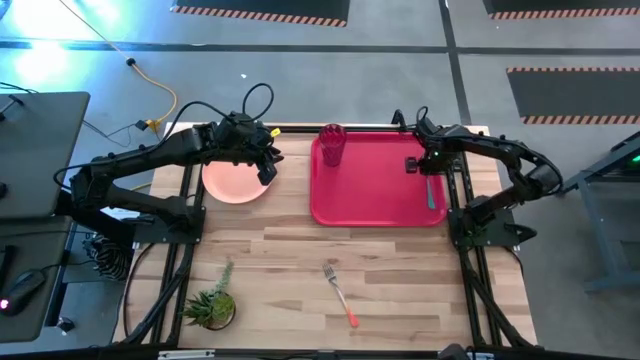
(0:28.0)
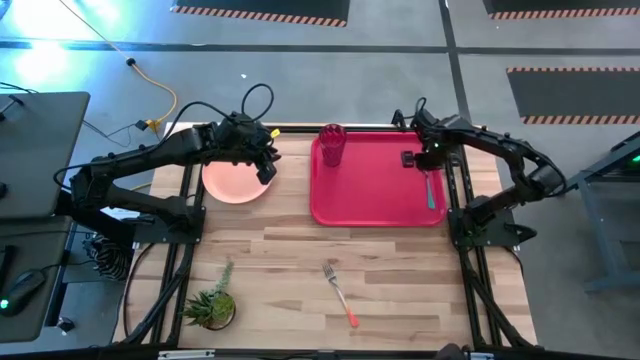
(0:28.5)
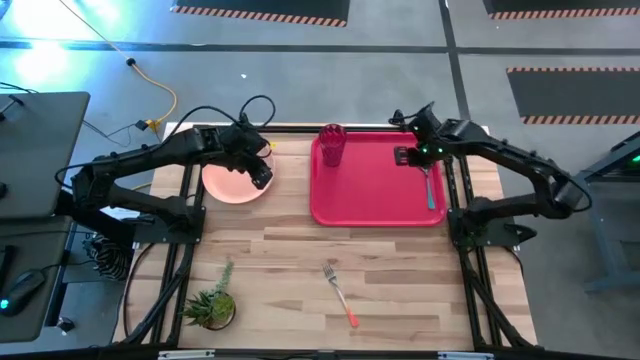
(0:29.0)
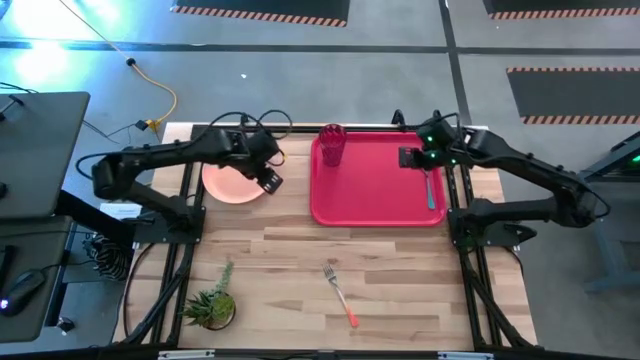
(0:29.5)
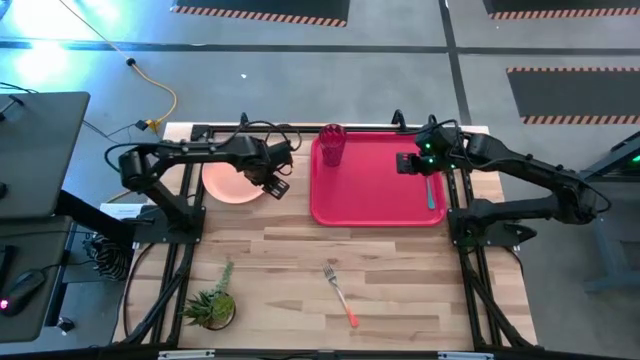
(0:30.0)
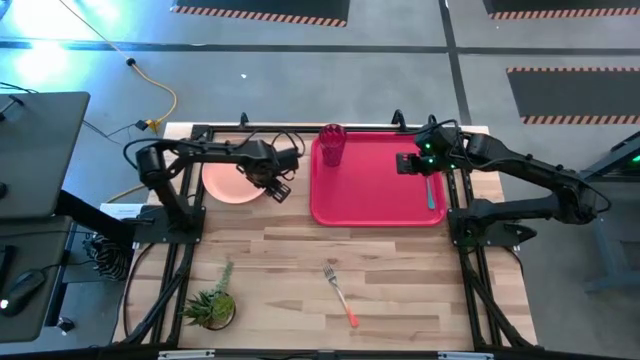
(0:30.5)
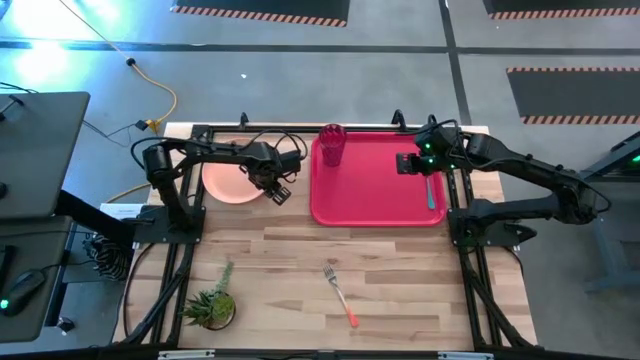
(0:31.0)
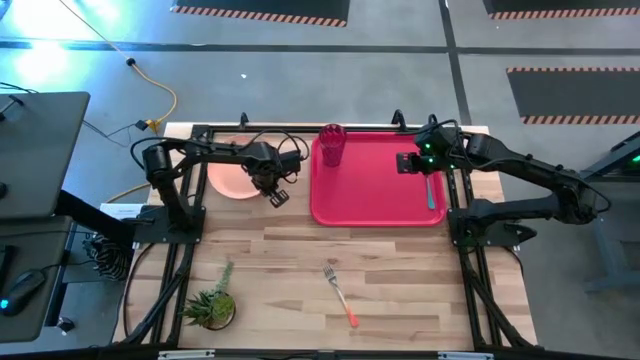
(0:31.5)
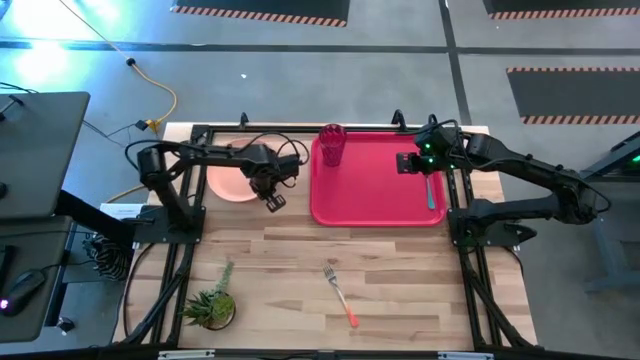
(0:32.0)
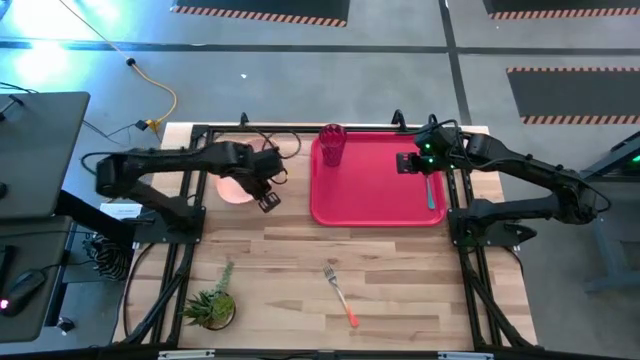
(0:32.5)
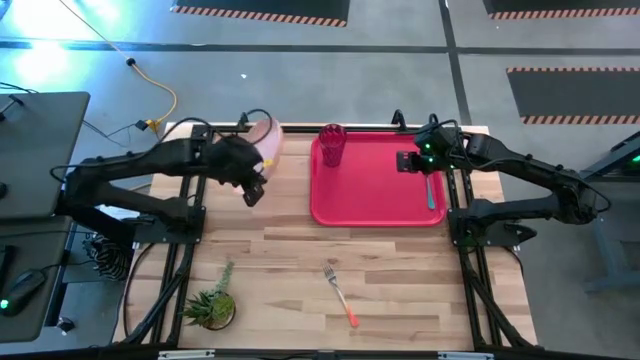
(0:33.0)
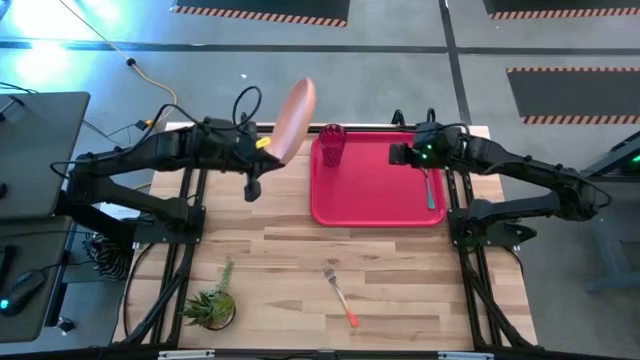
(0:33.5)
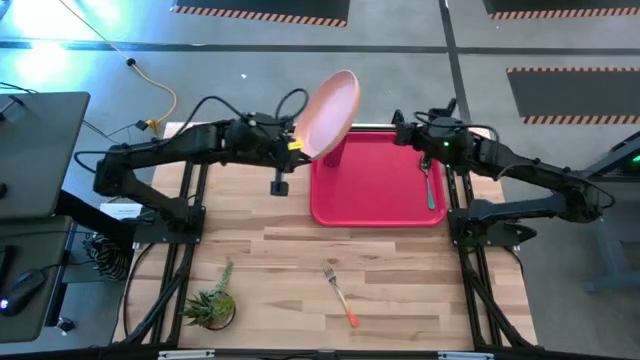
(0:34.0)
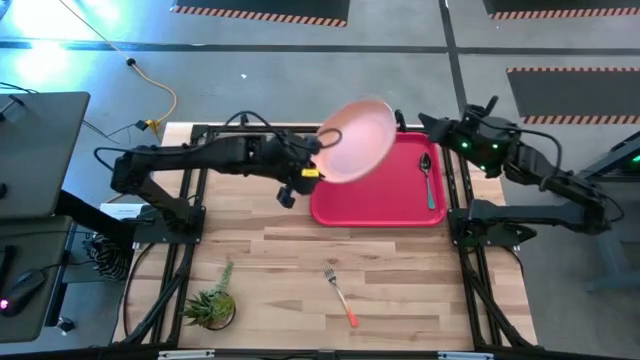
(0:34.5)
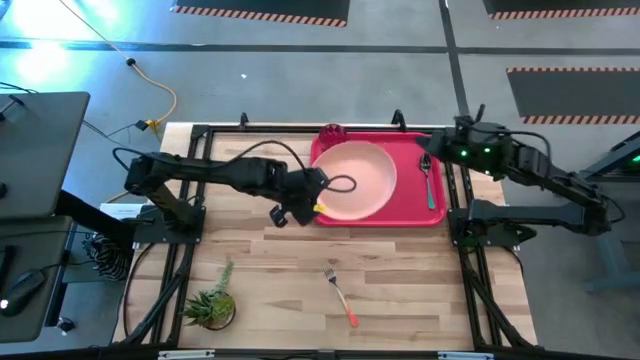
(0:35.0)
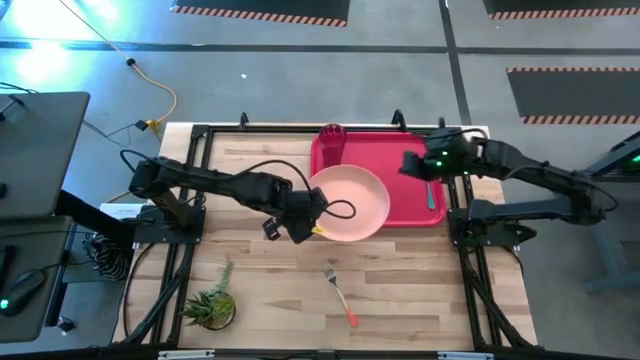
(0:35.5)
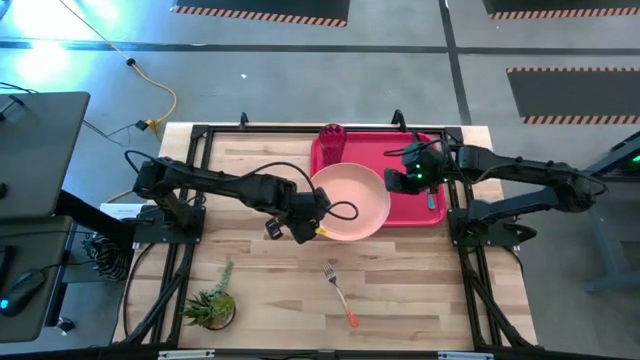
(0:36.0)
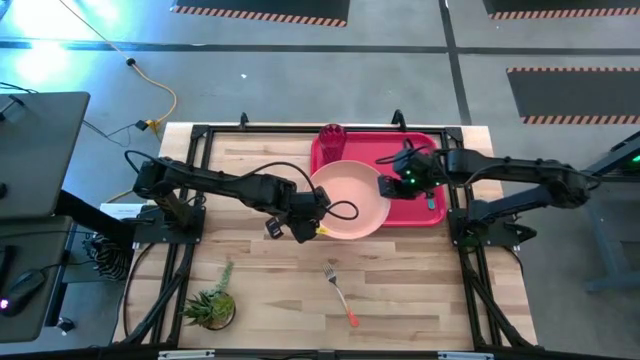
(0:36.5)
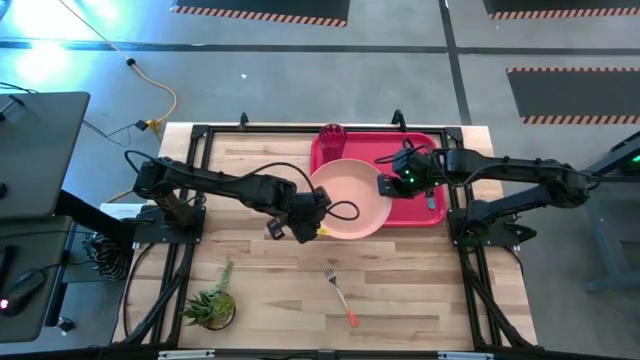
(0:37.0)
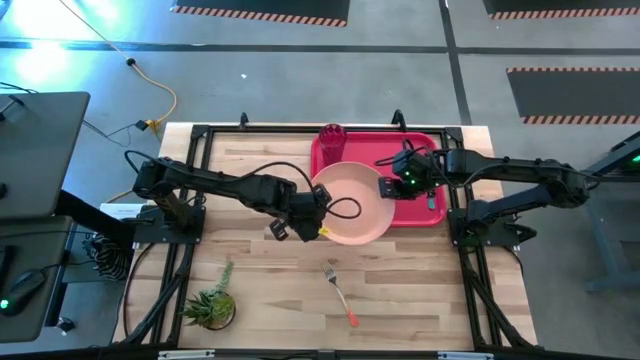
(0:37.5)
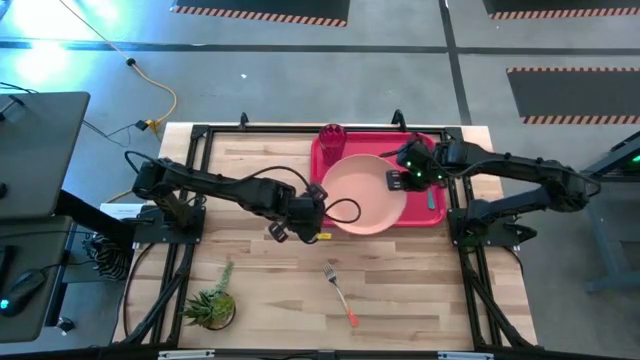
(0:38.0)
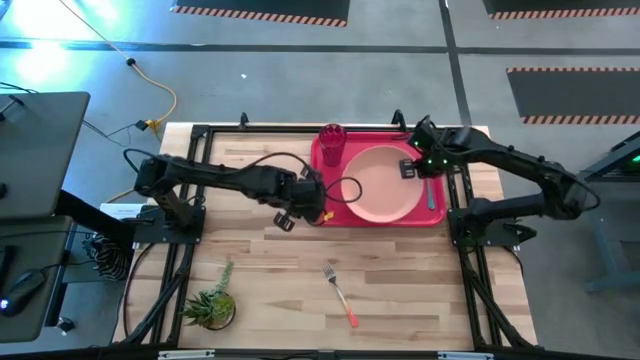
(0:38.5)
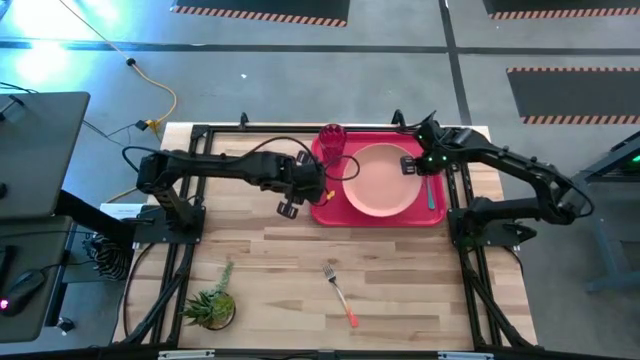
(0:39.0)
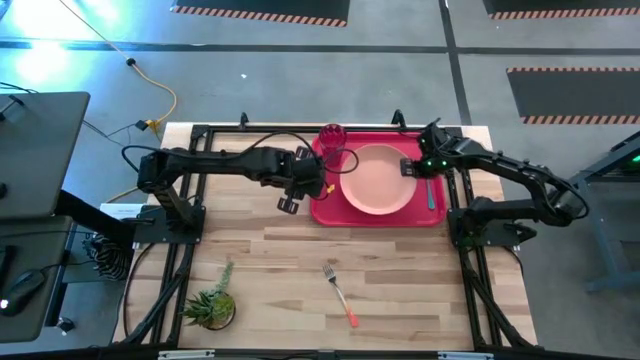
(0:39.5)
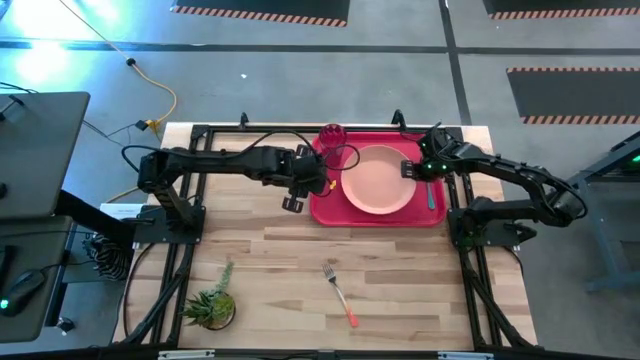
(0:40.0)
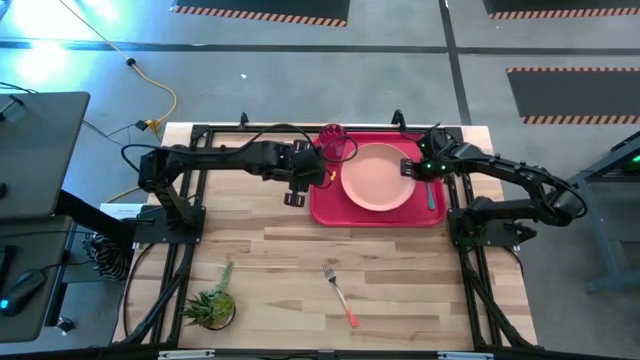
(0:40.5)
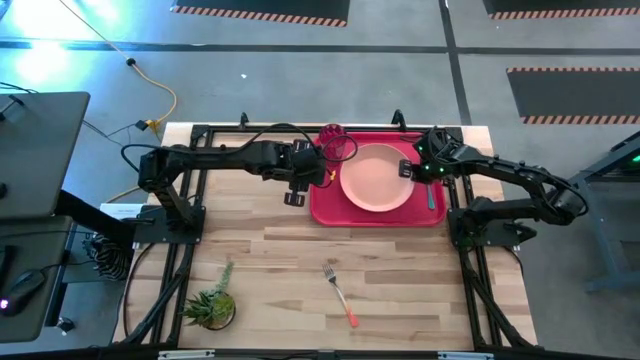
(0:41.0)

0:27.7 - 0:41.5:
Task: Pick and place plate/cup/fork/spoon on tray
Put the orange plate on the center of the red tray

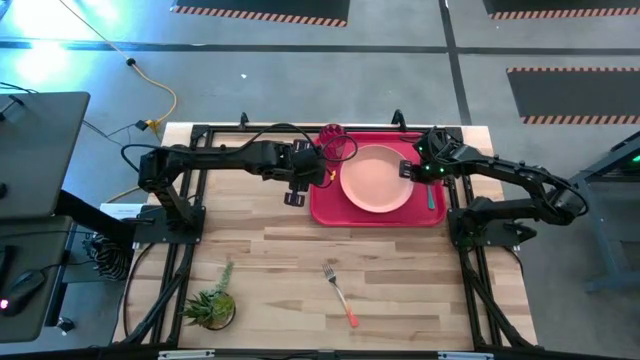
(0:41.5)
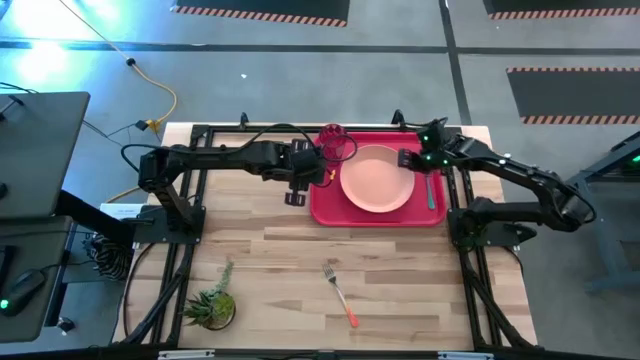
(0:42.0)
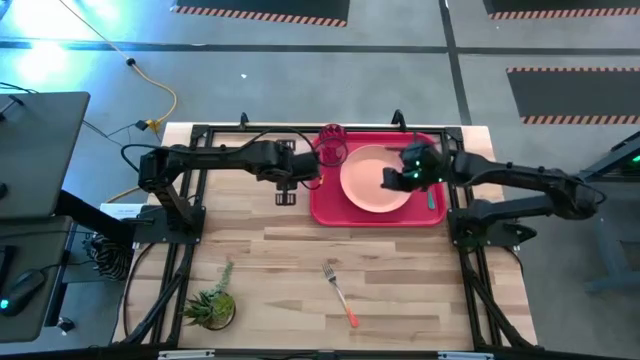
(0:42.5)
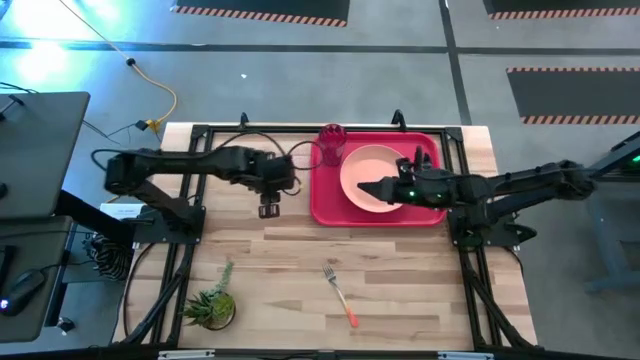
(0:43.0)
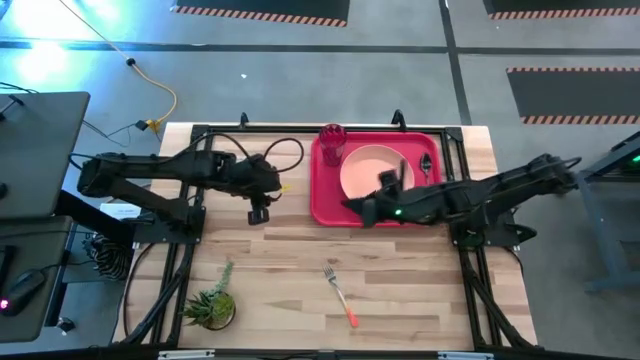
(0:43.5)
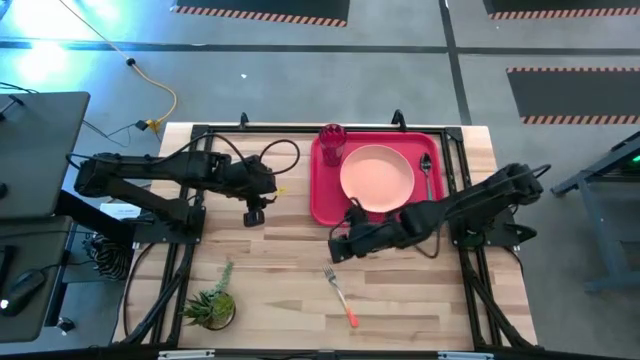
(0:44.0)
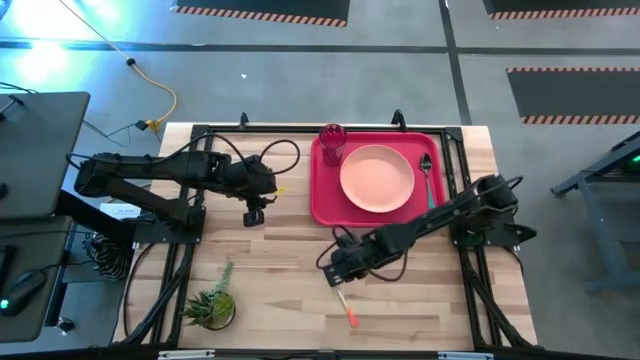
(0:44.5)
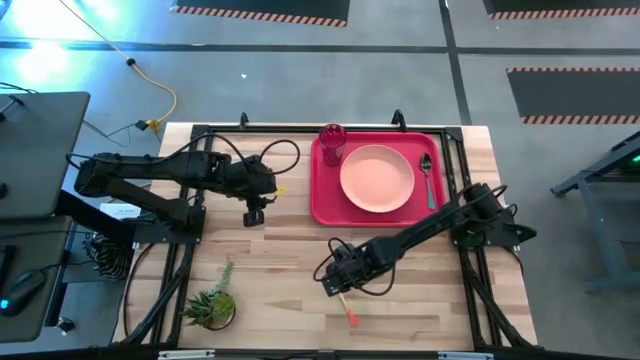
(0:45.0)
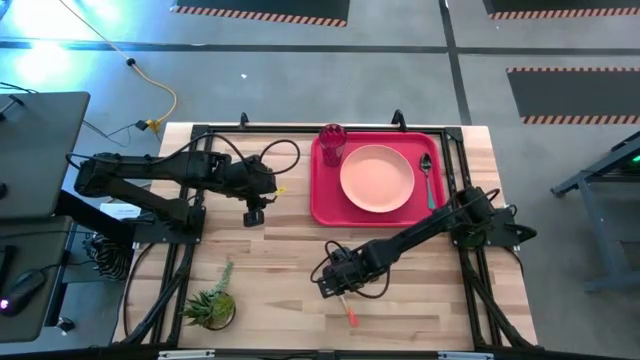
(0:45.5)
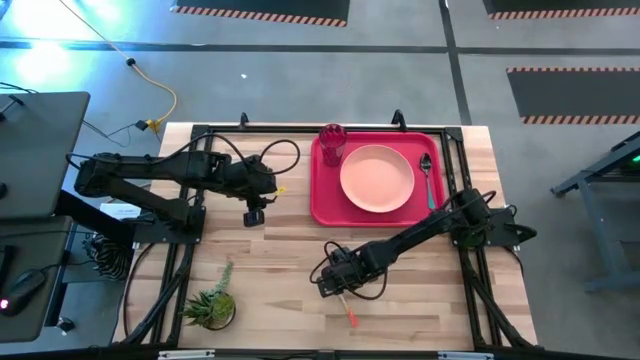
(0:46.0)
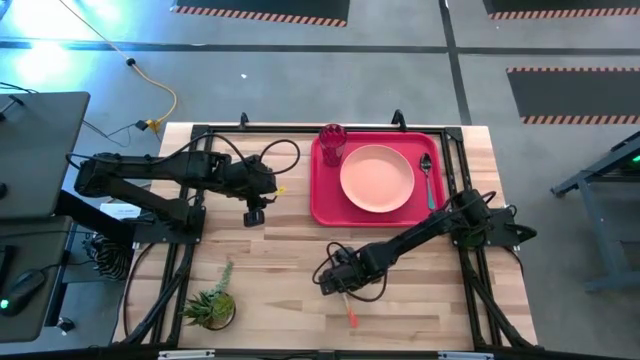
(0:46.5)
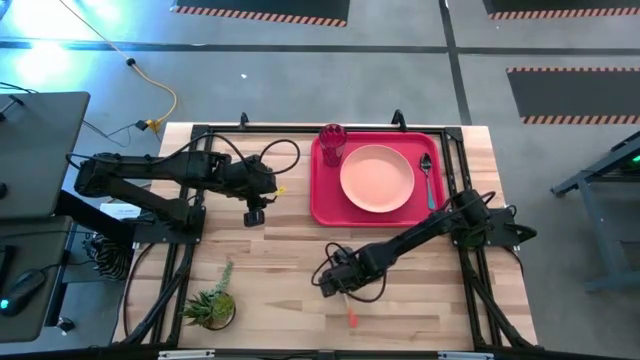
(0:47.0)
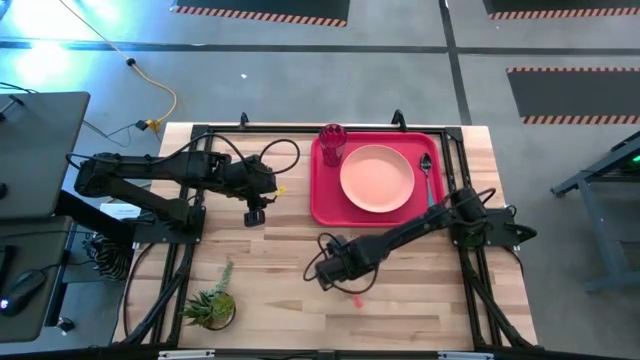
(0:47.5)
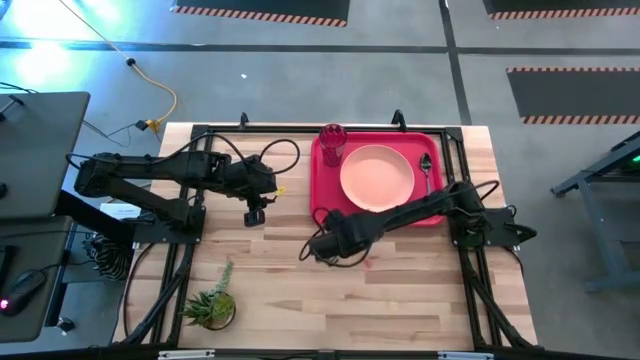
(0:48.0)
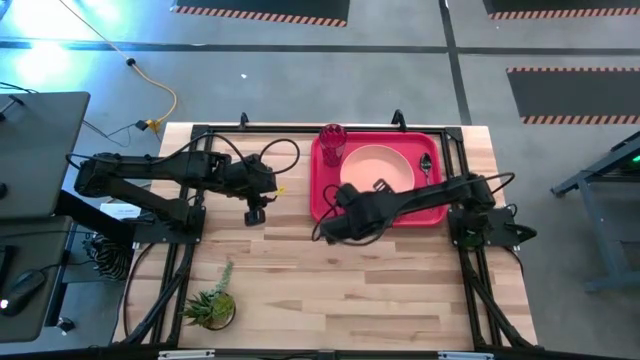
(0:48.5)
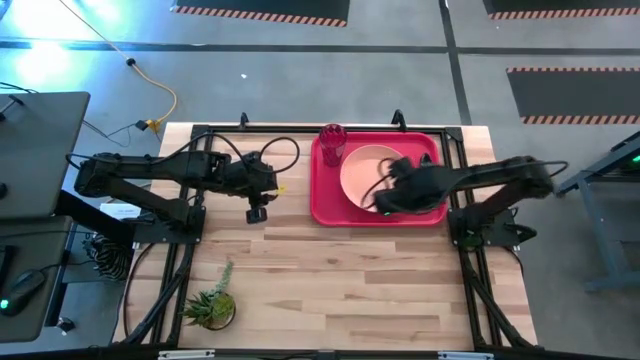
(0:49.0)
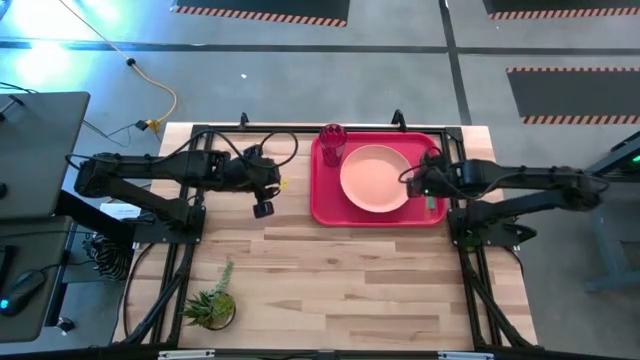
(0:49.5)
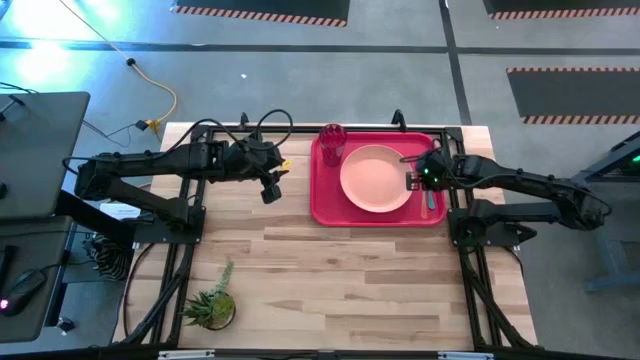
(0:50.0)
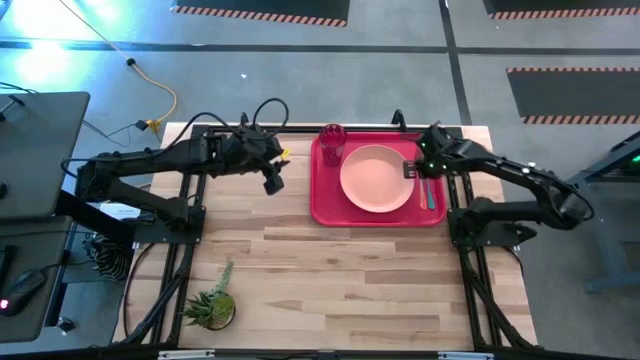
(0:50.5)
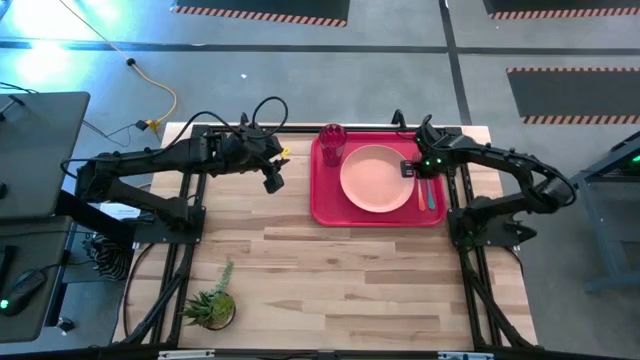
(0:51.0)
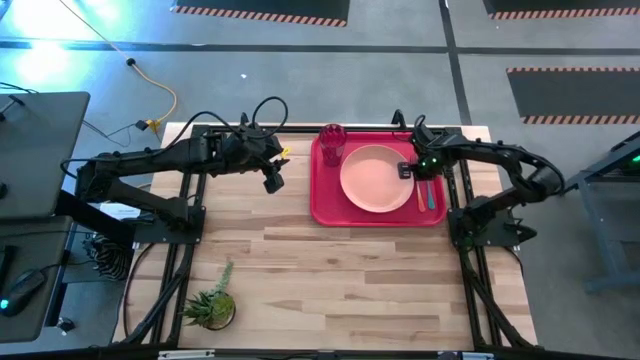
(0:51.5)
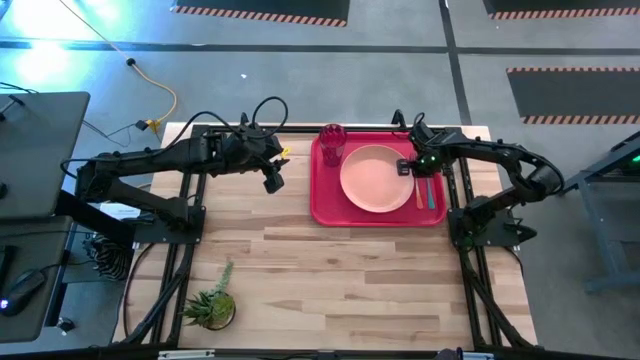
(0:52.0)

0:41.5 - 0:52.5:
Put the orange fork on the red tray in between the orange plate and the spoon
